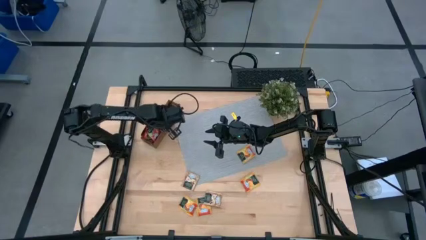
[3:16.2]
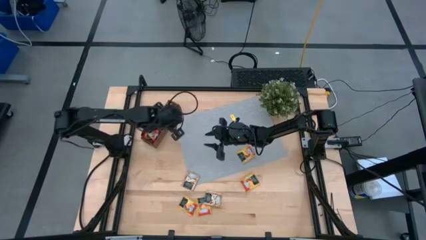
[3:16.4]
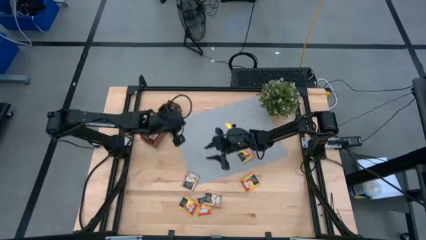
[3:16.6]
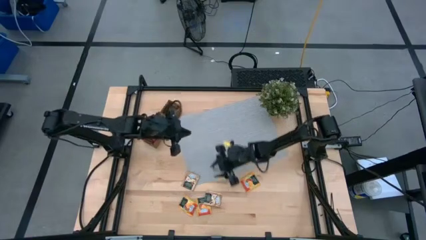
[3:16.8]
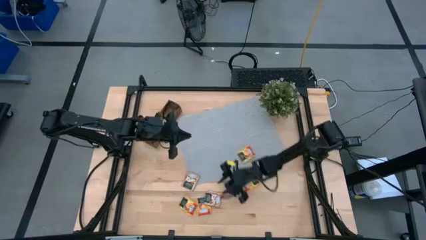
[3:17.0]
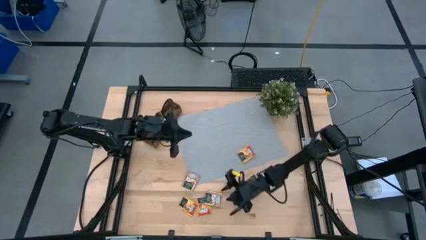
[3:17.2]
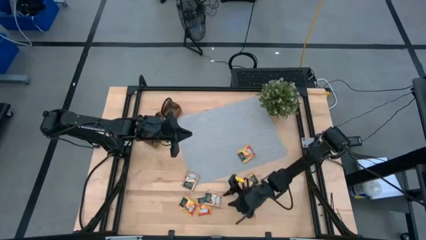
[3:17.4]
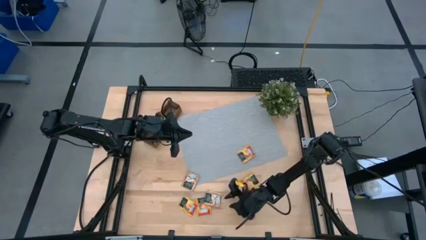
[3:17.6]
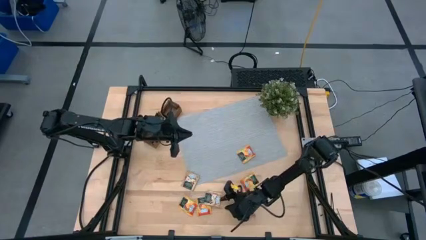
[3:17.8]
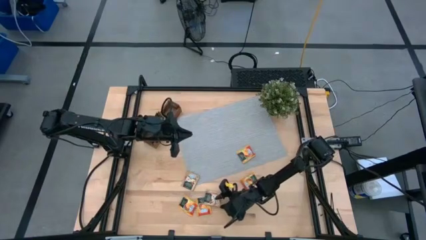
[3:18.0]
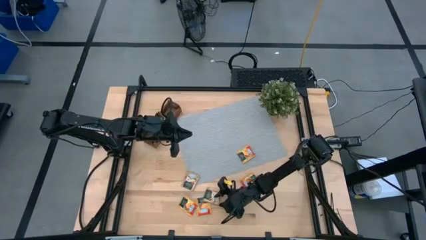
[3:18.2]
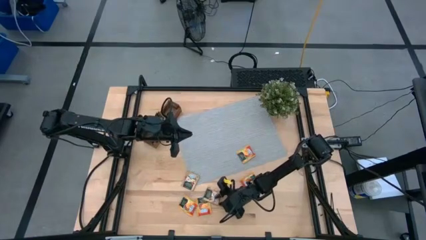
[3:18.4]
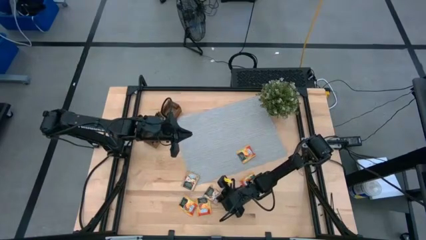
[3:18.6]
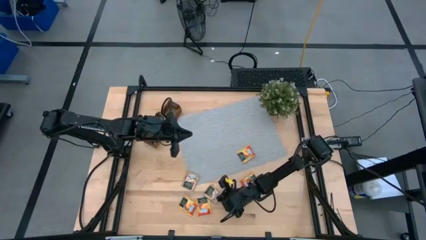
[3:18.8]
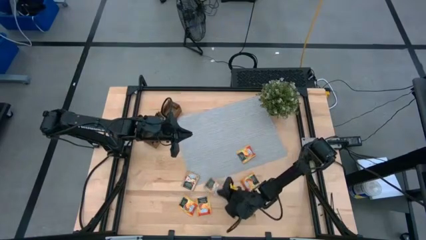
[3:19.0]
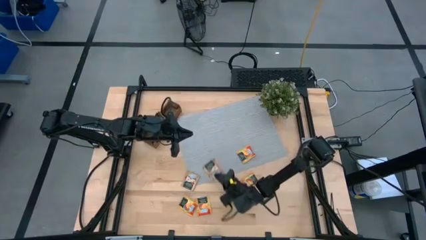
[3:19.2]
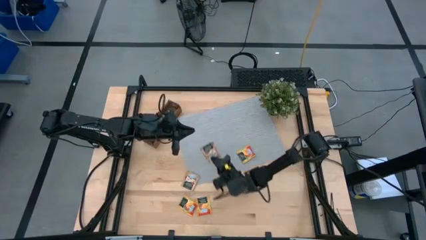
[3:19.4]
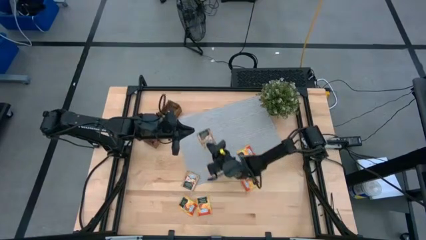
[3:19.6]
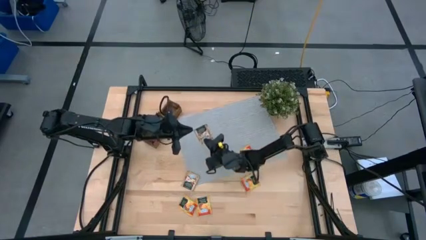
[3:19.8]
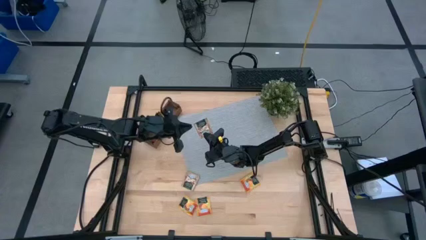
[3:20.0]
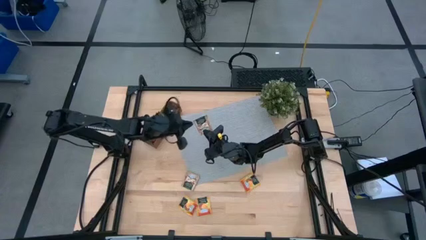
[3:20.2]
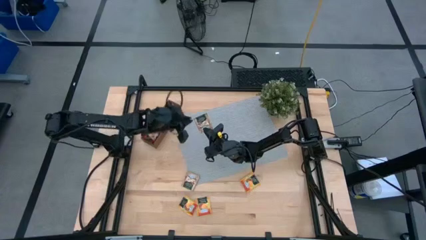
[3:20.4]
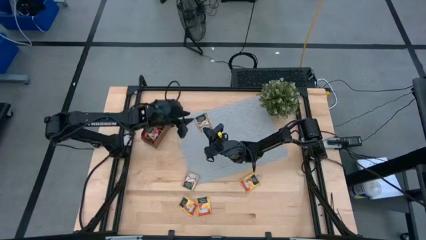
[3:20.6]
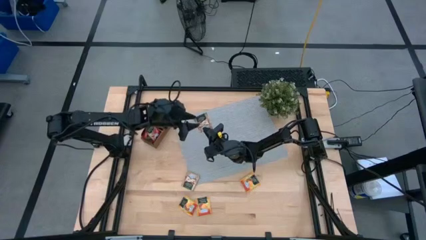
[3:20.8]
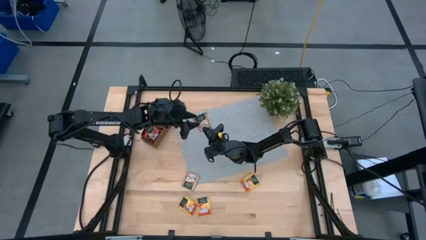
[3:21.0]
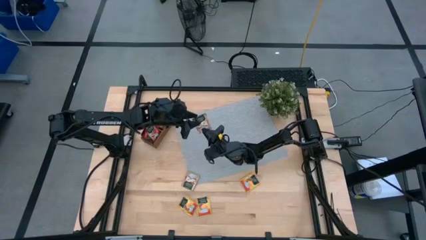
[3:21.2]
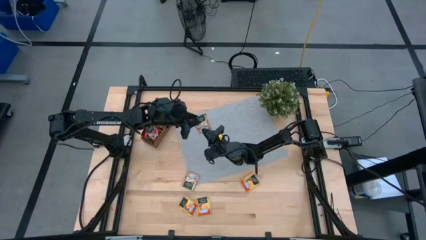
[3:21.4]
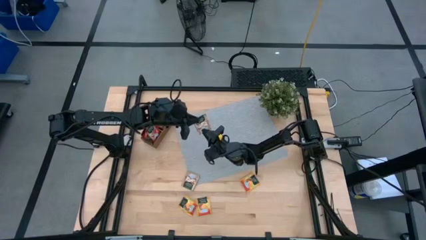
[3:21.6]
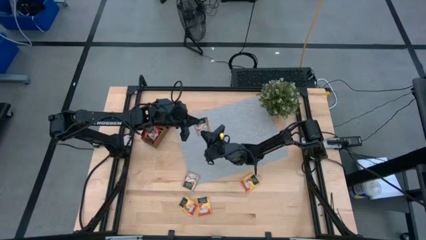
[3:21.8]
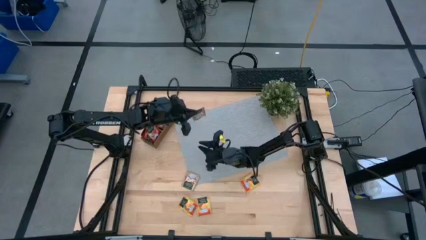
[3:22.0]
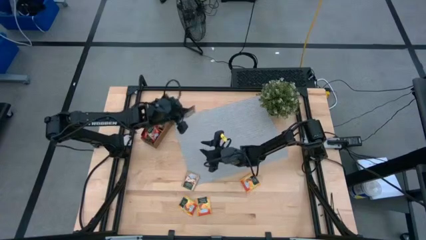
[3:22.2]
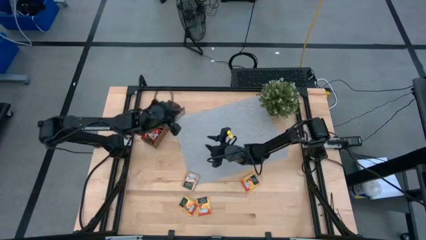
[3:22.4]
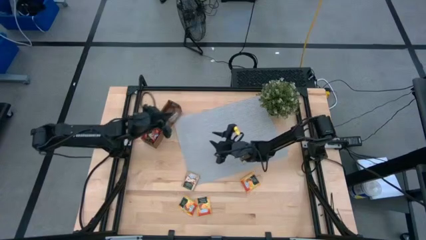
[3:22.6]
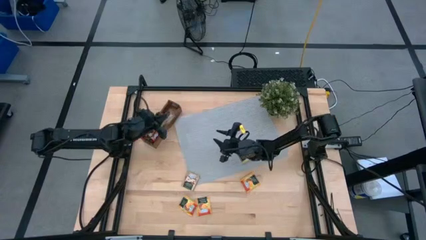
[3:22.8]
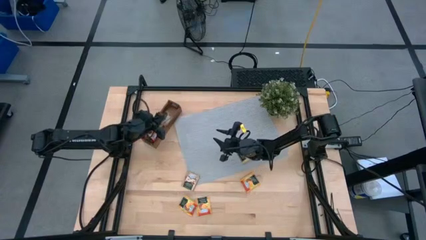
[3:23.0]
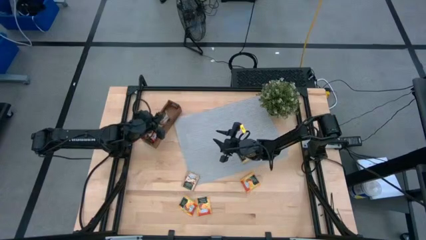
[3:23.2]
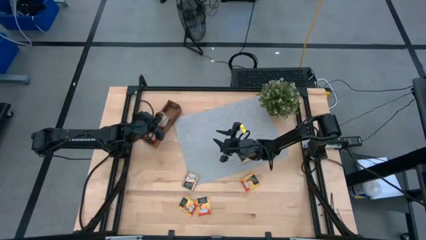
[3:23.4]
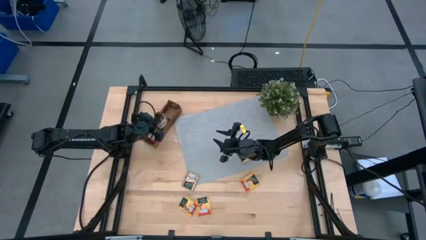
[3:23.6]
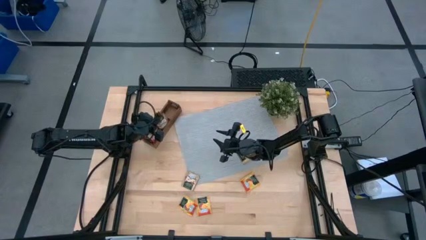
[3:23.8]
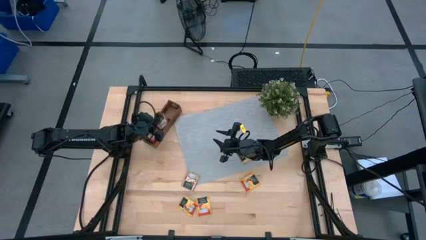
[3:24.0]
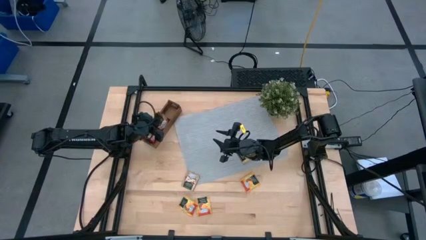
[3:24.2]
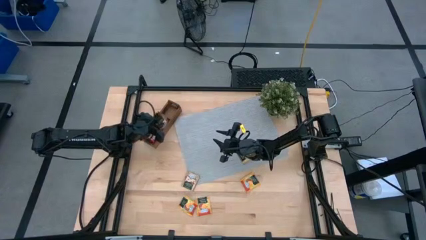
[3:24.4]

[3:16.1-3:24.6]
Task: Pick & Place Tea
Put the brown tea bag into the middle section of the wooden organizer

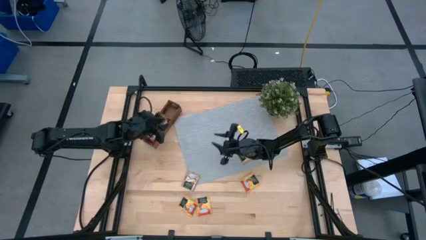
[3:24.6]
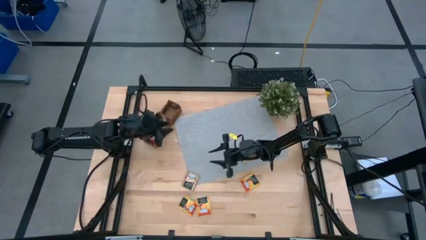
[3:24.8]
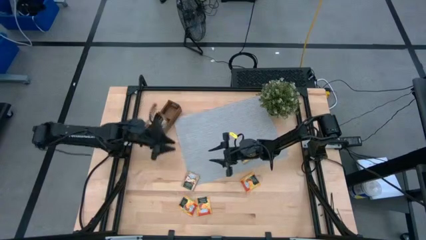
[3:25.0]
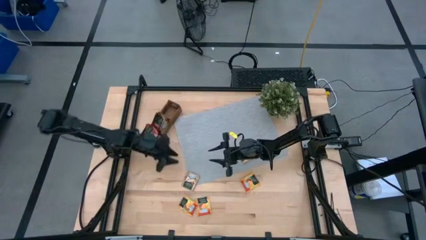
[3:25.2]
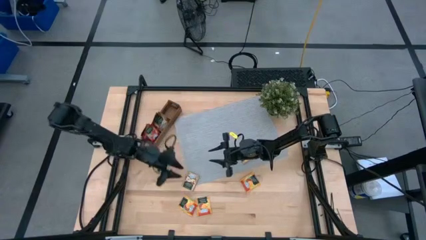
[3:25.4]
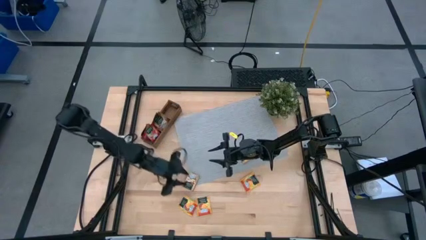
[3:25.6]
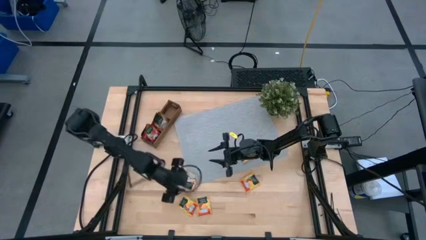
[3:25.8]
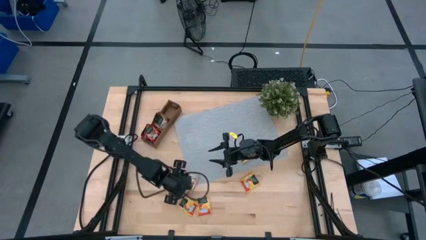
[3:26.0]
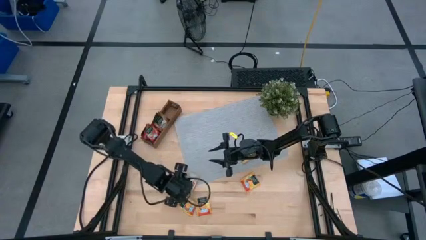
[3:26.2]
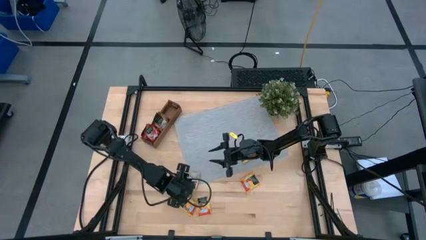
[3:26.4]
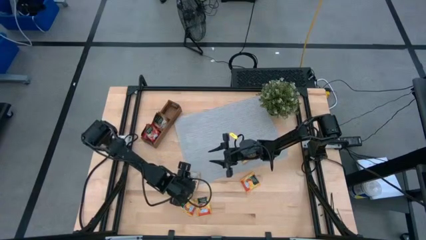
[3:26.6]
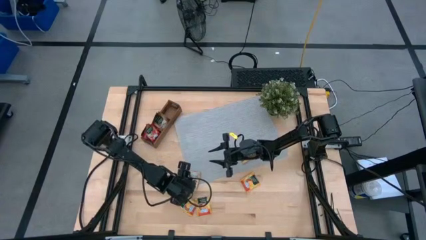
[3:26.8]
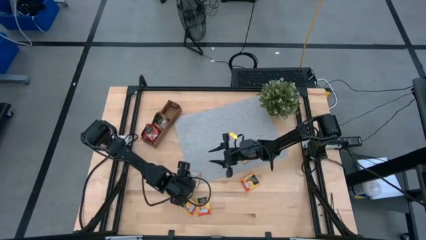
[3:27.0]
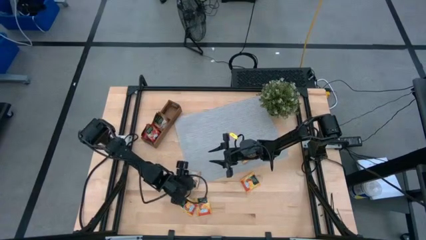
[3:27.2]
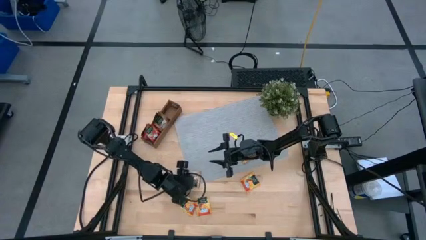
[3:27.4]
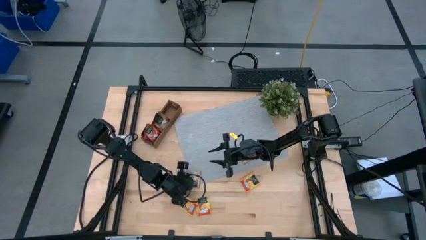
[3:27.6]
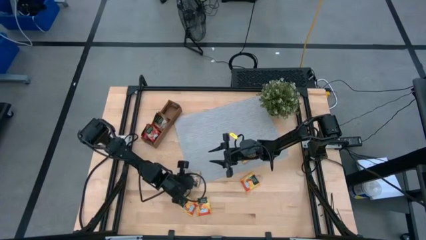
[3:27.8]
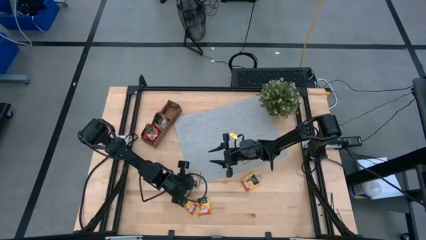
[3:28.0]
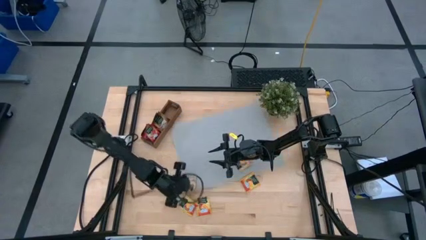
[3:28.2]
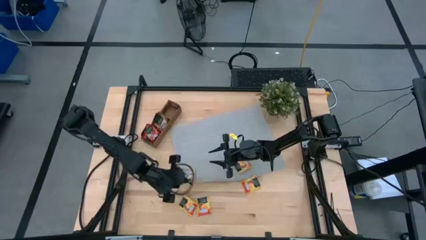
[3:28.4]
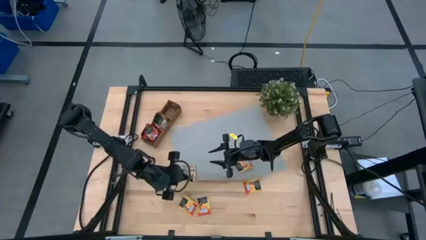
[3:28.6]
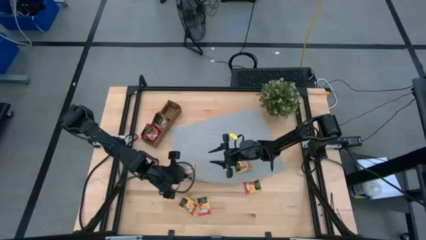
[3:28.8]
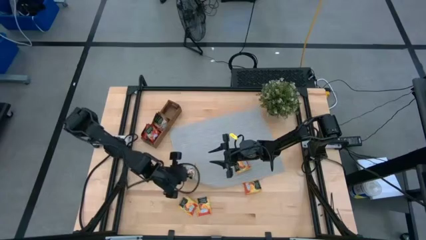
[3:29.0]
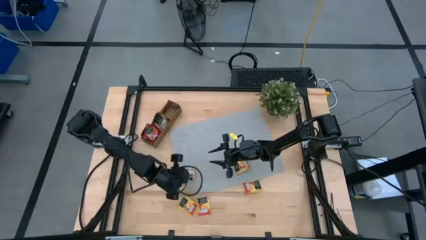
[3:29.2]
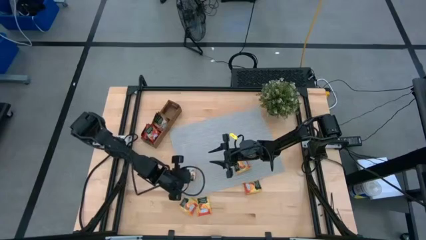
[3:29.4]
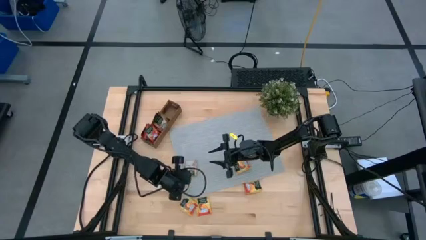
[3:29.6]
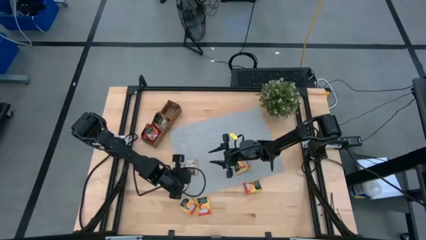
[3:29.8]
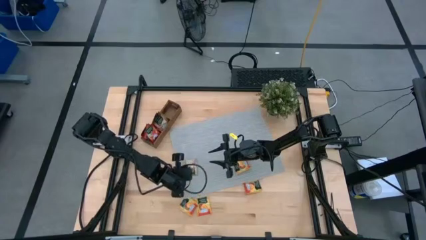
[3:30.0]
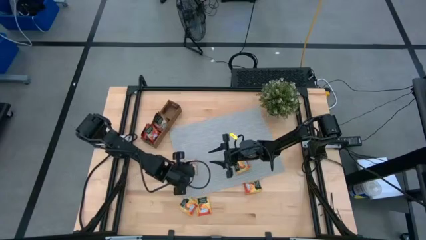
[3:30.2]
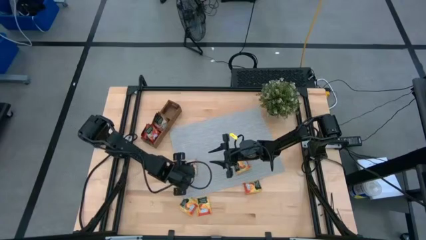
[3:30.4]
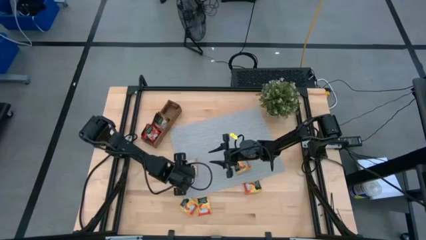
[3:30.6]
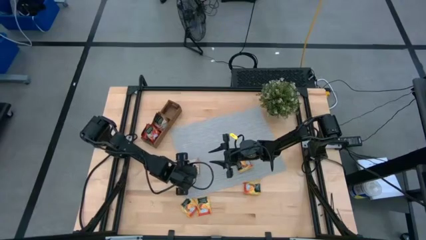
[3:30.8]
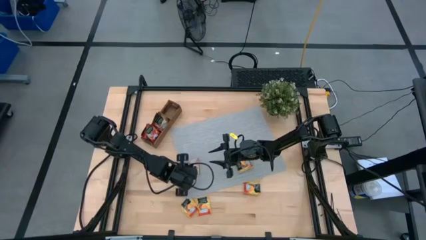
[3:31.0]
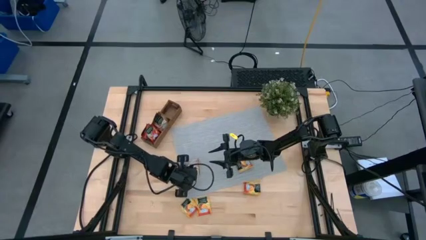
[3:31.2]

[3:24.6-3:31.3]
Put the brown tea bag into the middle section of the wooden organizer

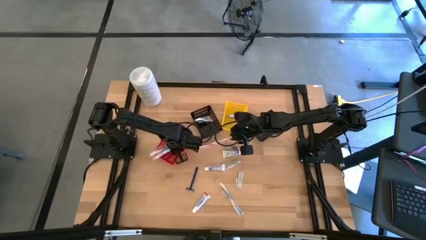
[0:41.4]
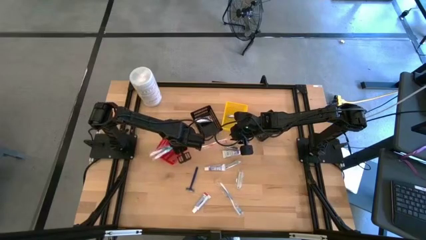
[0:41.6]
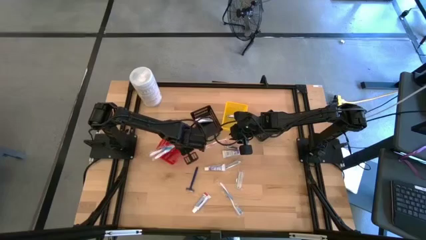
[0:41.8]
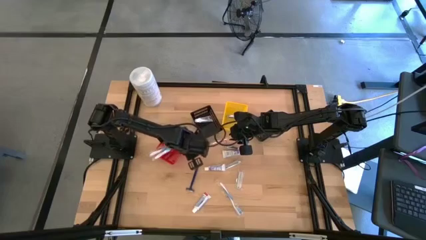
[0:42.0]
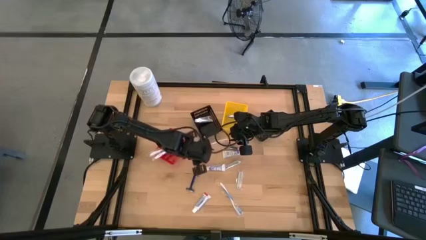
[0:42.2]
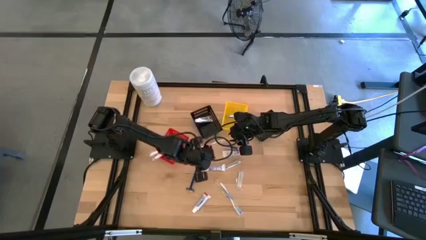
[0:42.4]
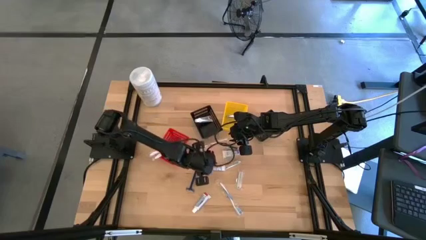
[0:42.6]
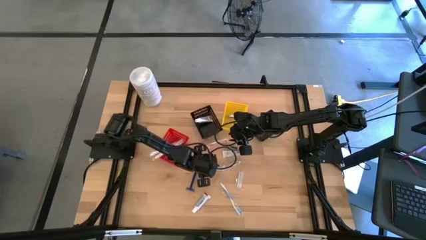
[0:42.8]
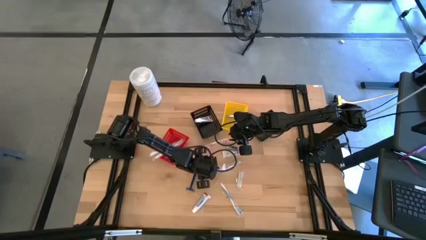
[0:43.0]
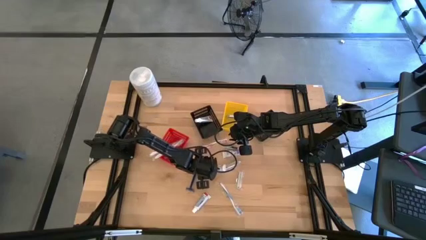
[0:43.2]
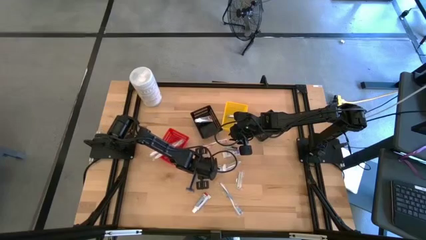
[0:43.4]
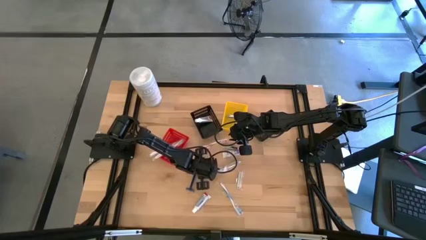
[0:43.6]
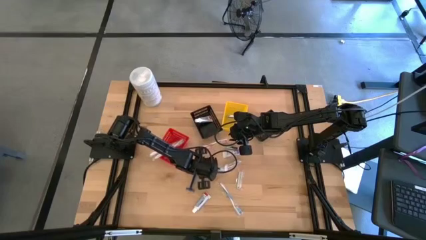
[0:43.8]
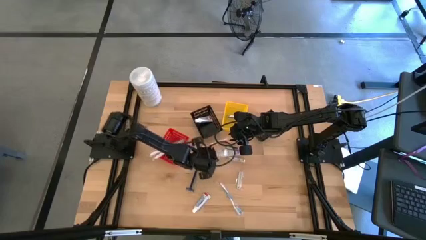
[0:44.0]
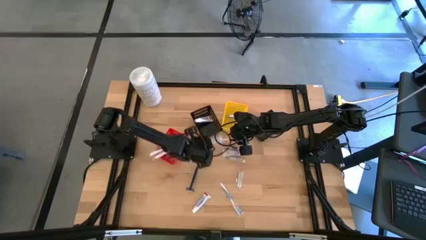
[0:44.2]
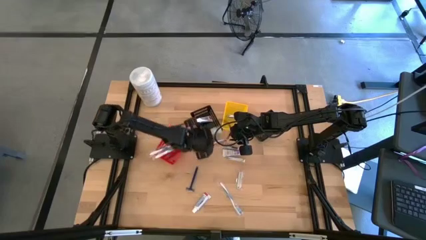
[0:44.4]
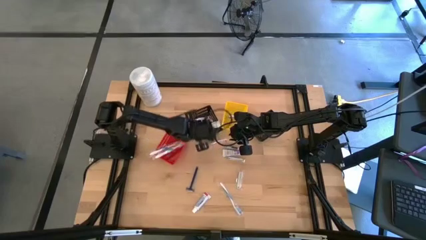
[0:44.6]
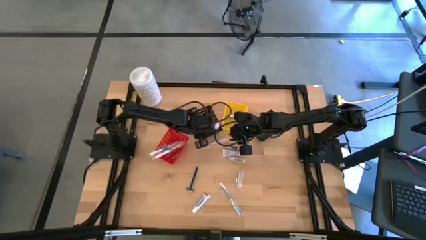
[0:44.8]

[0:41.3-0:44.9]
Task: Pick & Place Travel size toiletries
Put the toothpaste into the left black bin
